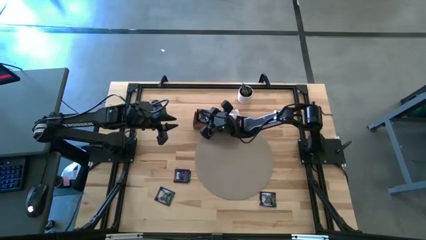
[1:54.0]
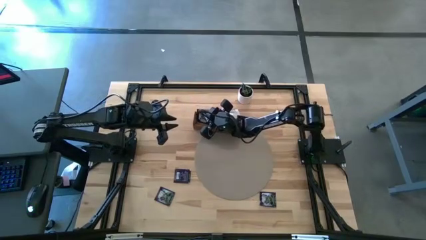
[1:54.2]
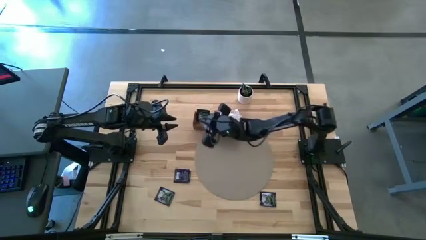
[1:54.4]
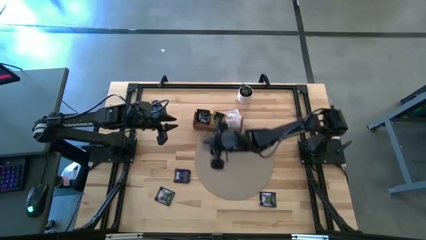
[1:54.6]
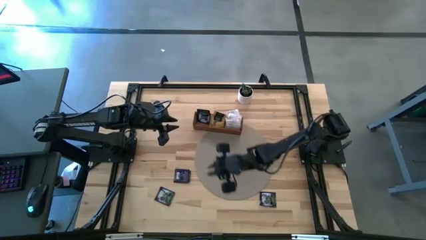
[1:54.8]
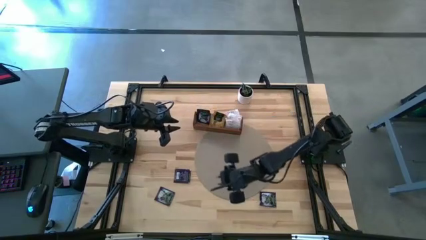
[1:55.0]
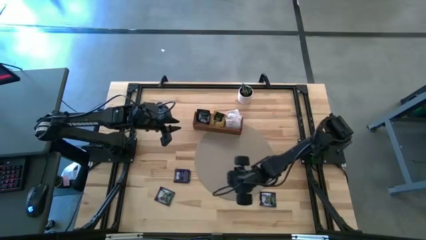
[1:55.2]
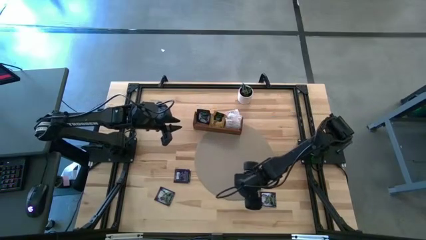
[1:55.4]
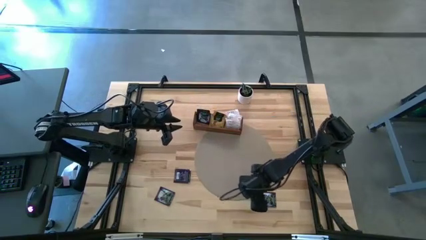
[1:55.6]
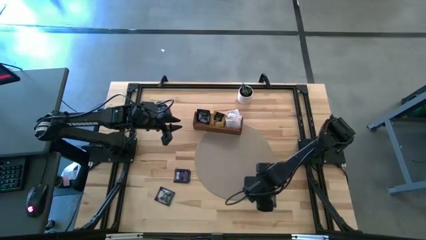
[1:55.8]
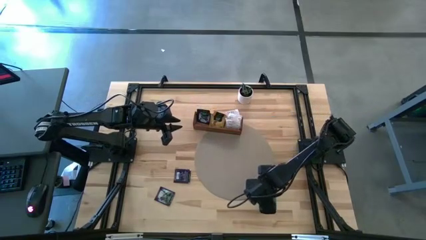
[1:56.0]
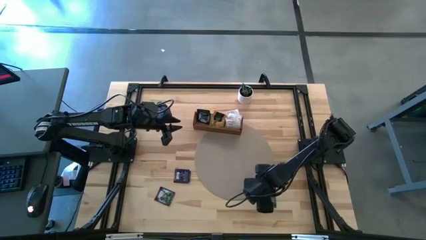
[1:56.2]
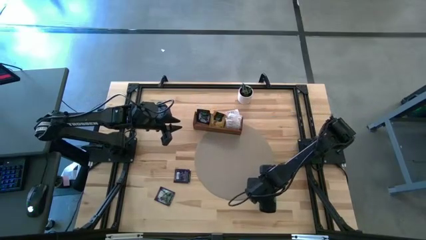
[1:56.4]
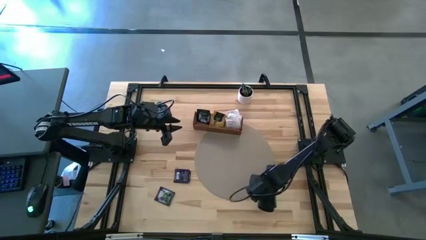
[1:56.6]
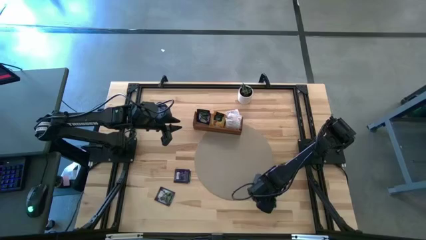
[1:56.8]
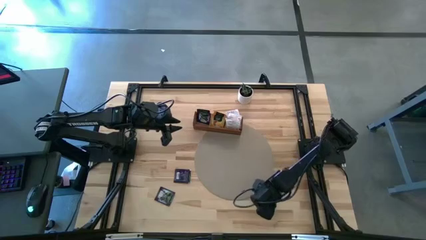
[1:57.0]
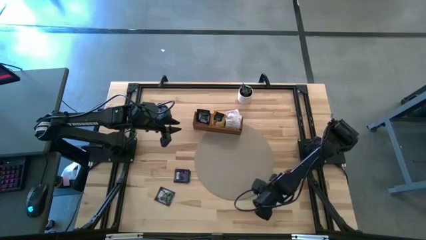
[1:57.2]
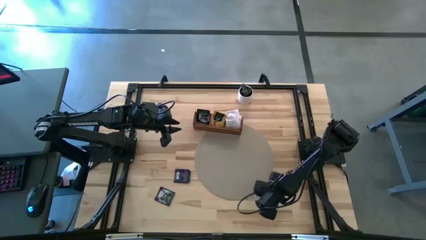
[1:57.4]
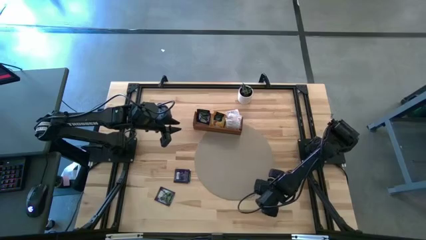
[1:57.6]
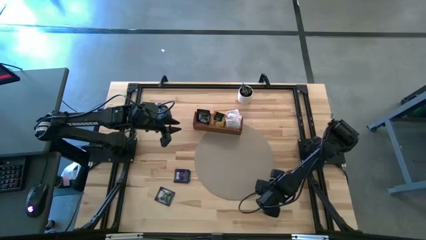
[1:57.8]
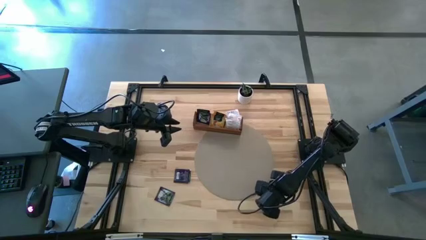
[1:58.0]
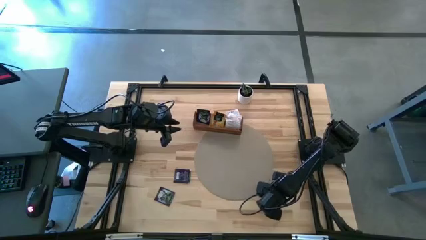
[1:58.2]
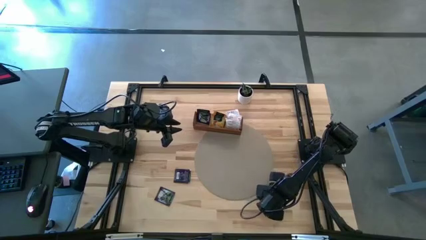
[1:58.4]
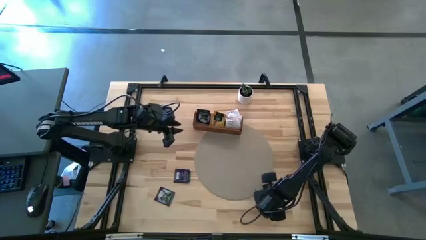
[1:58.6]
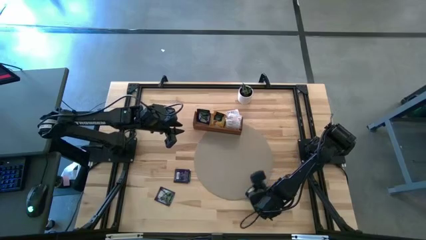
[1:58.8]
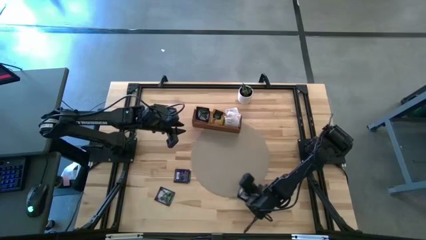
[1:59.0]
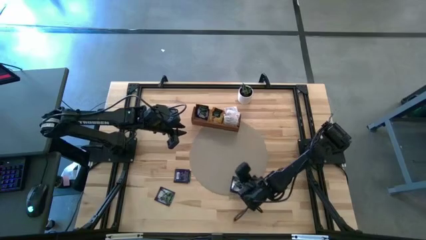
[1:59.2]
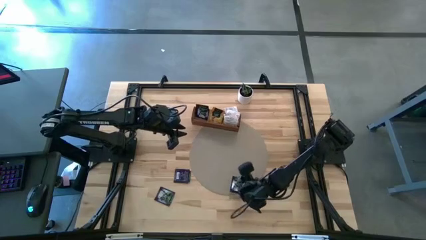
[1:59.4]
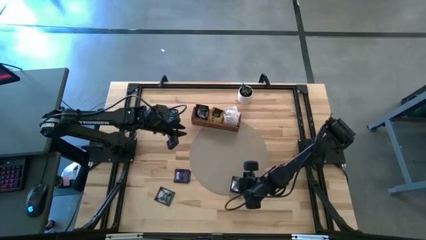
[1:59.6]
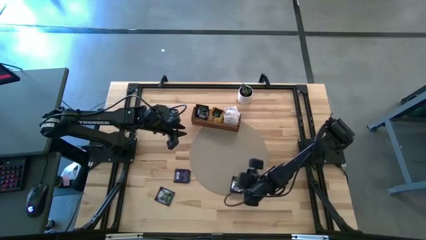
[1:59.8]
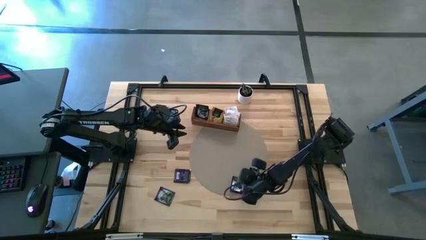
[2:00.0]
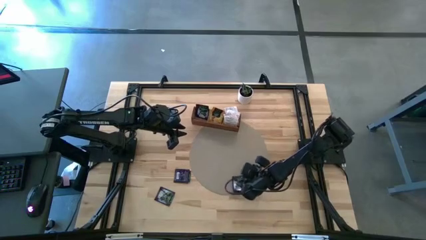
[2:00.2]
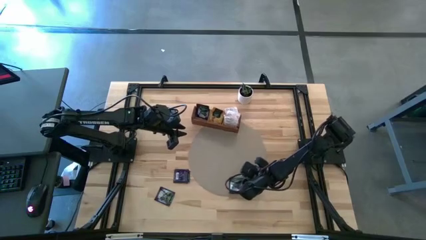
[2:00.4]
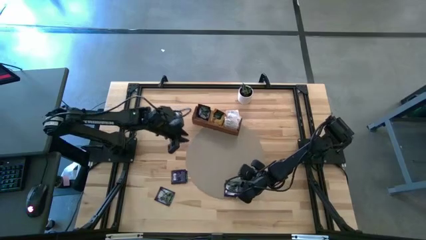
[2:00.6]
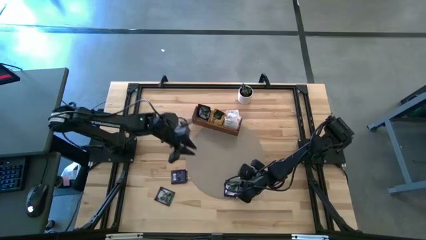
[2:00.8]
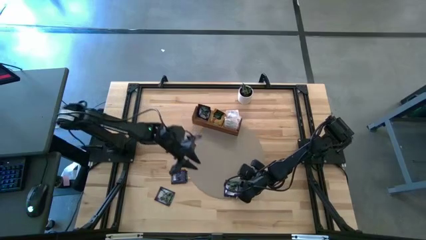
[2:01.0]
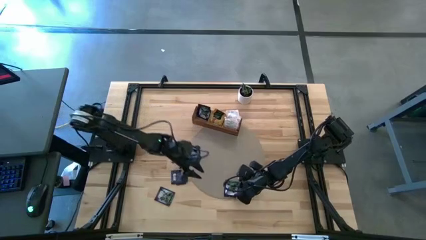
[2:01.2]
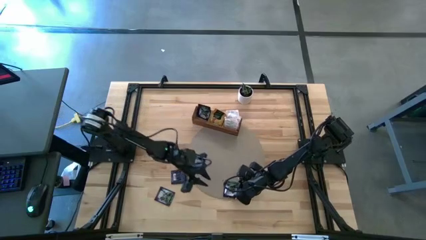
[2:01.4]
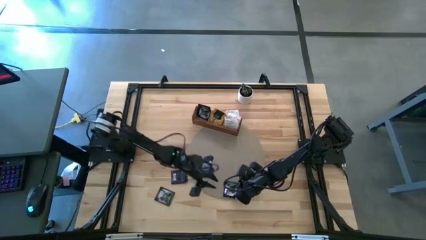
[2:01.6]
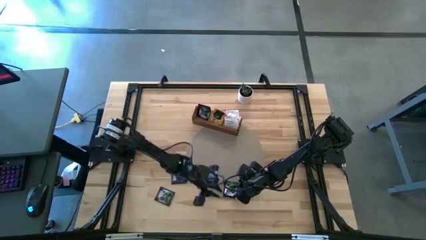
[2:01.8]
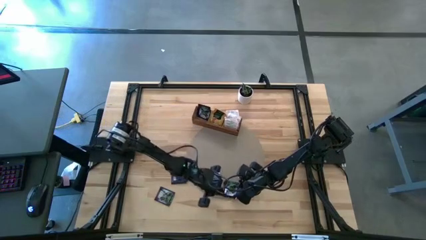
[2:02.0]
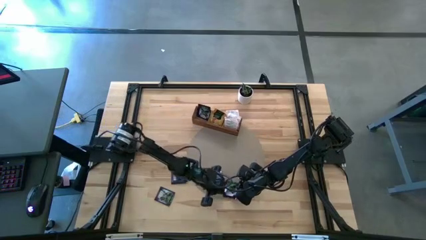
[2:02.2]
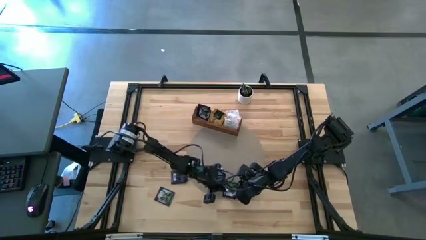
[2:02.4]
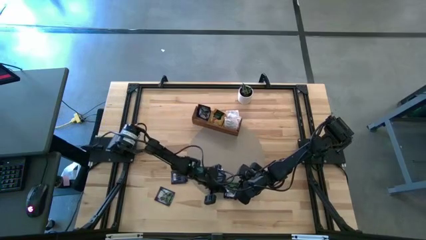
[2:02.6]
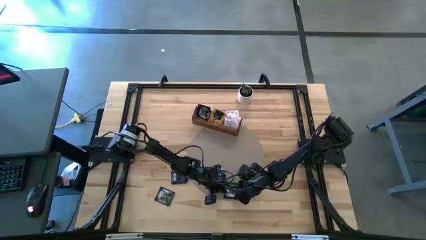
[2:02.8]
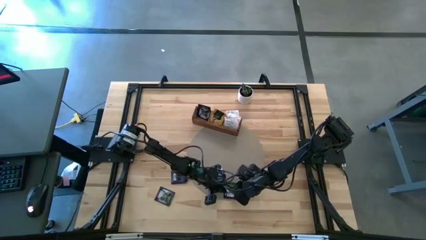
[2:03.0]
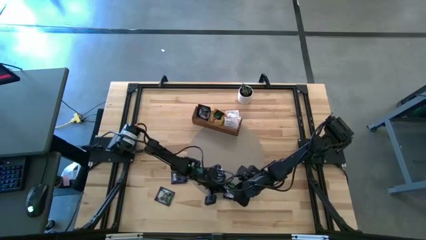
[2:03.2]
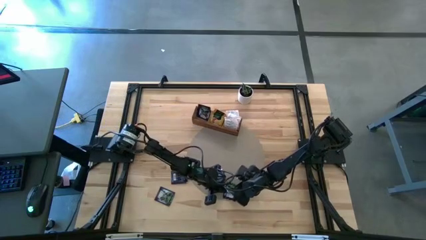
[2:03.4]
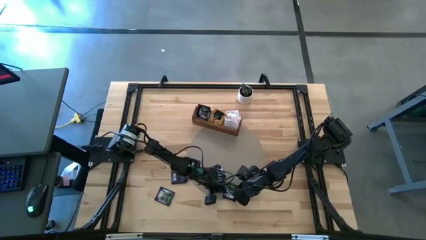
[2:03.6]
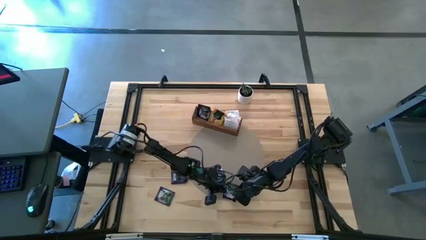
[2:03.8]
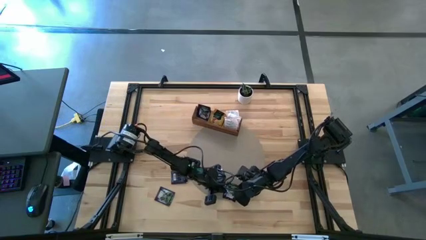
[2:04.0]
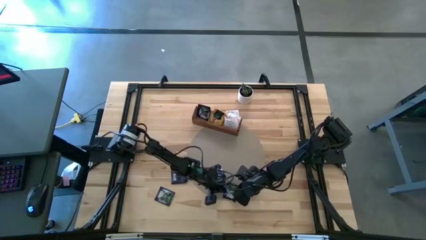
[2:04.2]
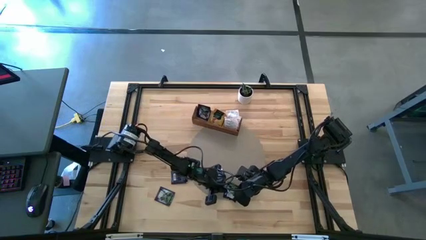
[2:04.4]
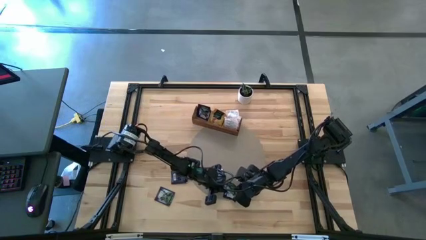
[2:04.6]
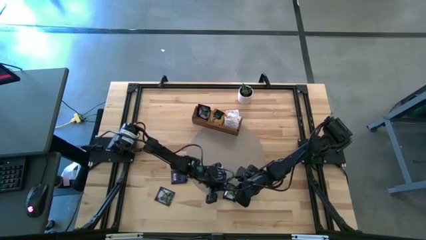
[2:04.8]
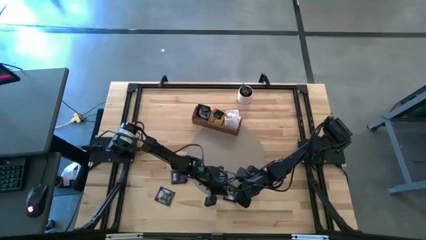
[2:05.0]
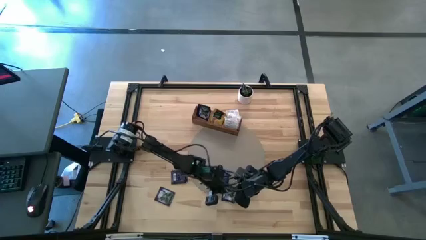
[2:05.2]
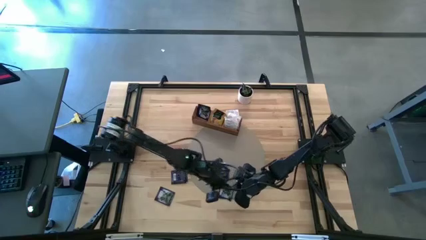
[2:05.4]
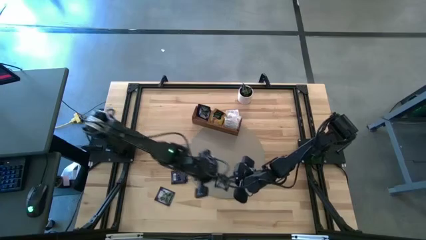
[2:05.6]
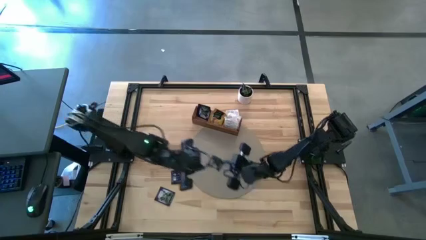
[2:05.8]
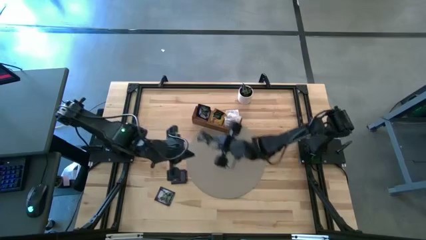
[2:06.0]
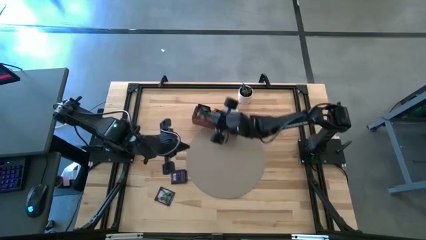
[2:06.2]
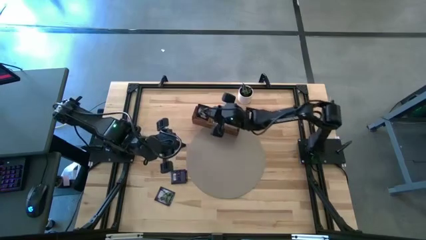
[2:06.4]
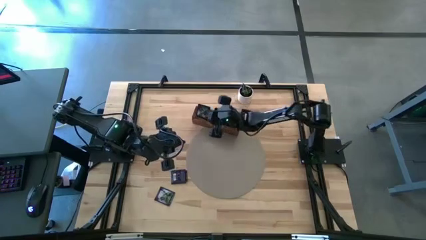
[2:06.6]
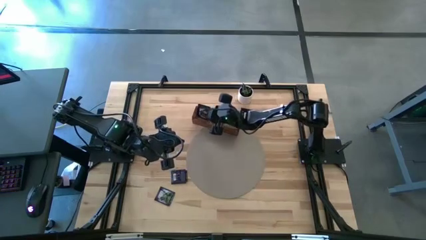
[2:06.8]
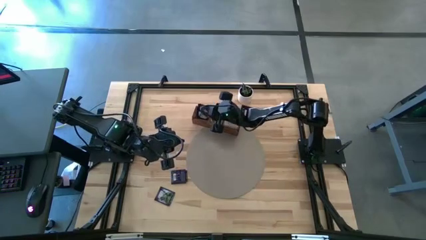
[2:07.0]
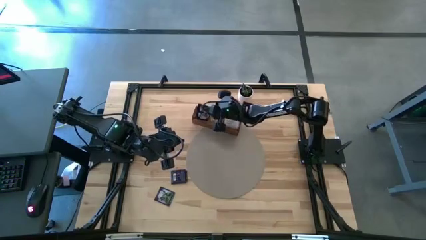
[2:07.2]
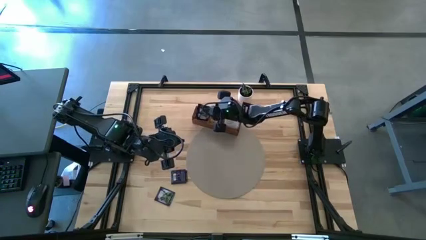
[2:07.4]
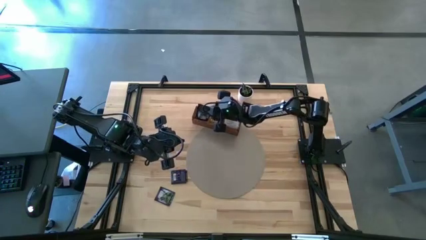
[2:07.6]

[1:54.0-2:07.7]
Task: Pick & Place Tea
Put the dark blue tea bag into the left section of the wooden organizer

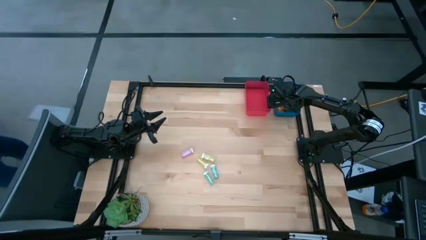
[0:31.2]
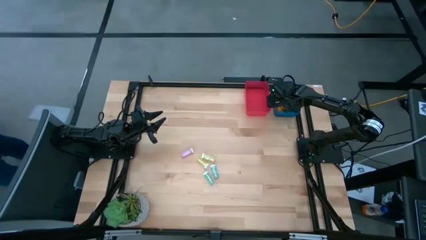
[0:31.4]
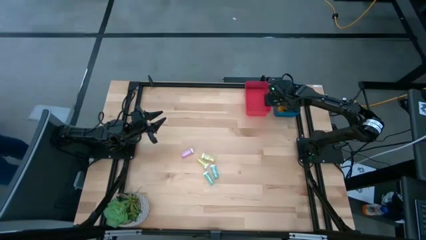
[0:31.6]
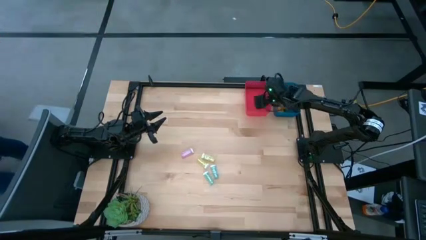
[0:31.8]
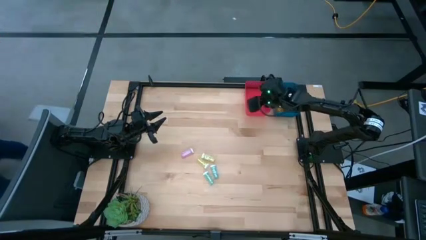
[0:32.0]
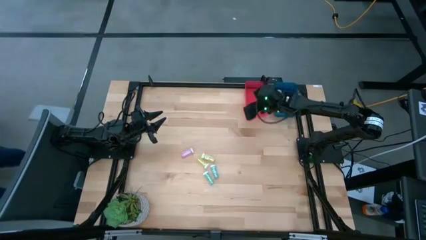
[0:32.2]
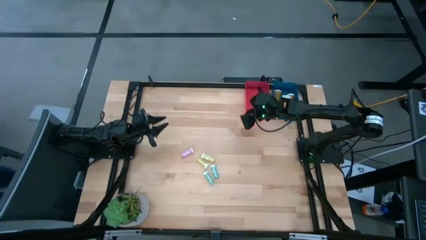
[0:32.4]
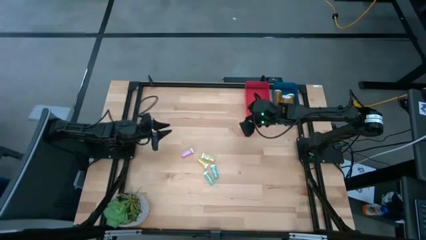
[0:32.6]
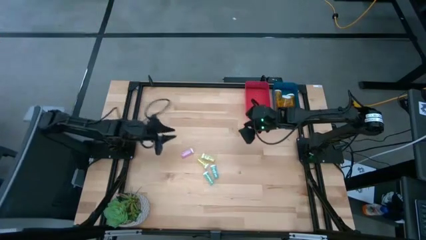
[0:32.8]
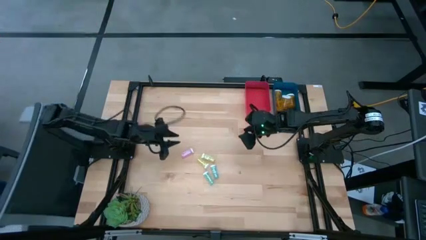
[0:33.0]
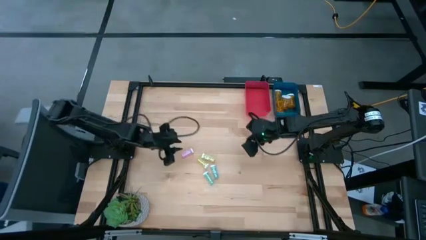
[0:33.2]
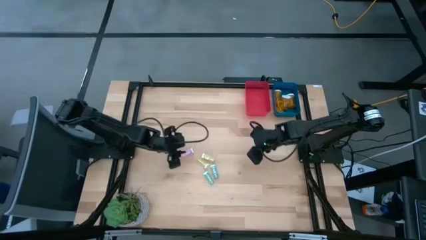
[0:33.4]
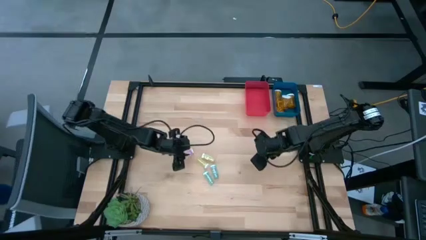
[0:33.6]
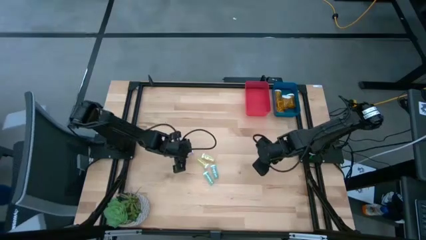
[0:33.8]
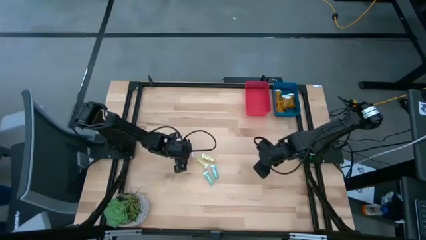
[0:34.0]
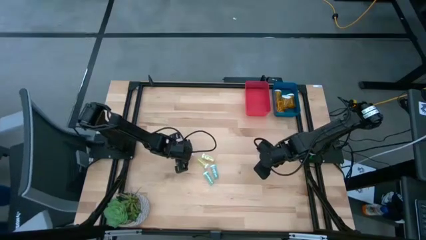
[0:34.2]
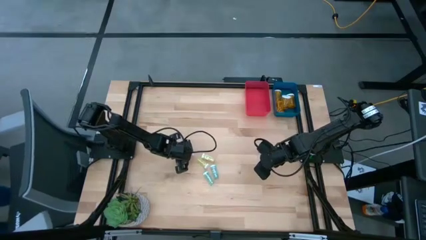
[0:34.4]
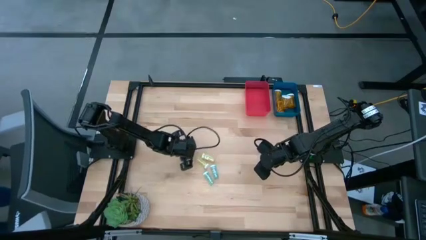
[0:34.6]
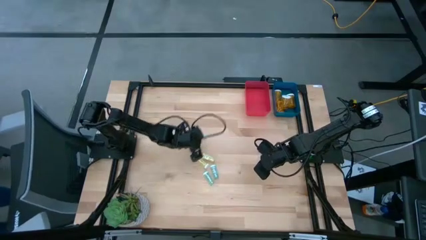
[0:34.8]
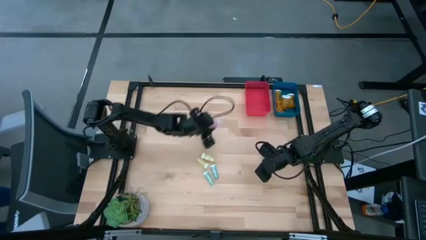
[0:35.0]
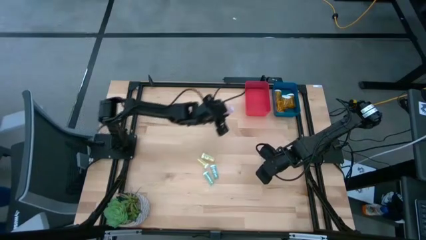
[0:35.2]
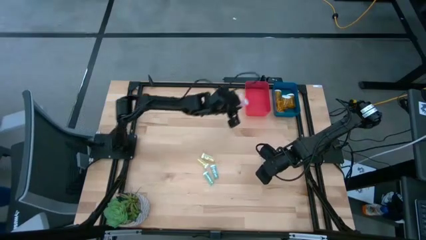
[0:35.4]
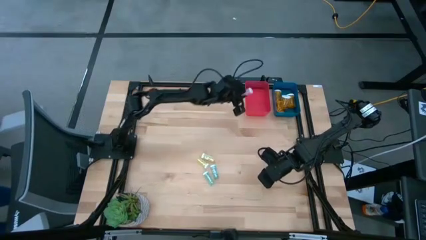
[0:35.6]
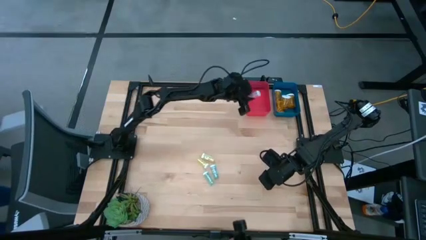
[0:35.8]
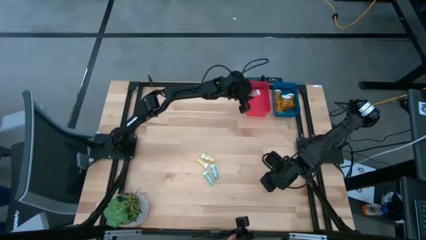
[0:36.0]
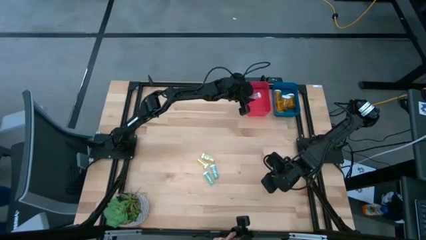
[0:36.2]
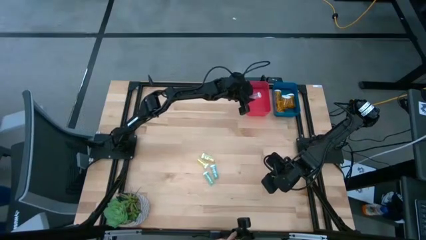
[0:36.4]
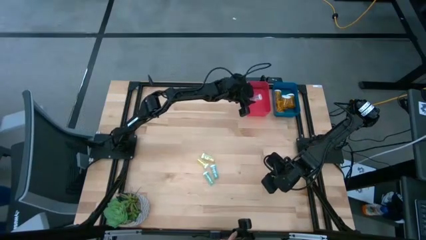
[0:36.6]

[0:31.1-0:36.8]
Task: Pick and place medicine bottles into bin by pill shape (circle, oval)
Put the pink tablet bottle into the red bin
